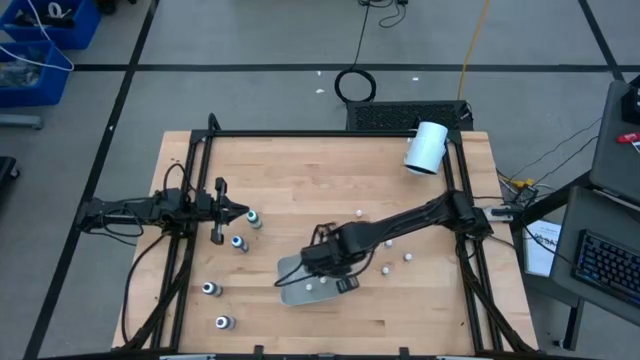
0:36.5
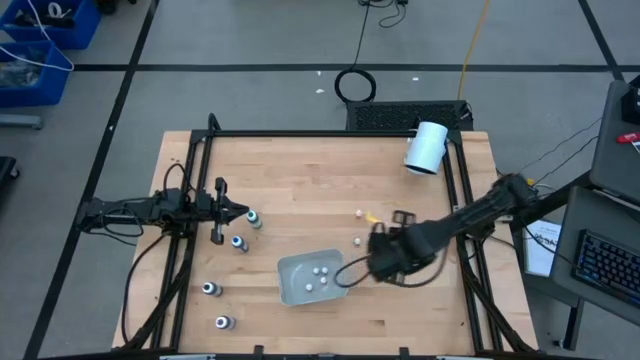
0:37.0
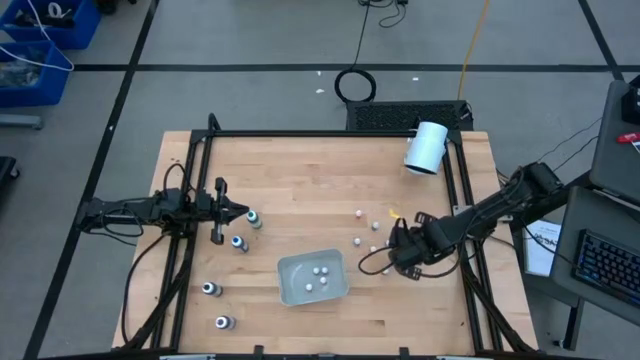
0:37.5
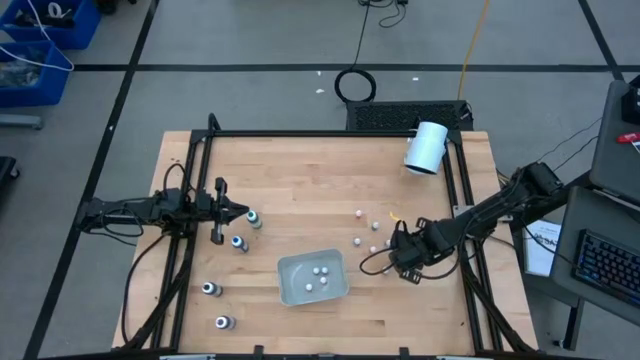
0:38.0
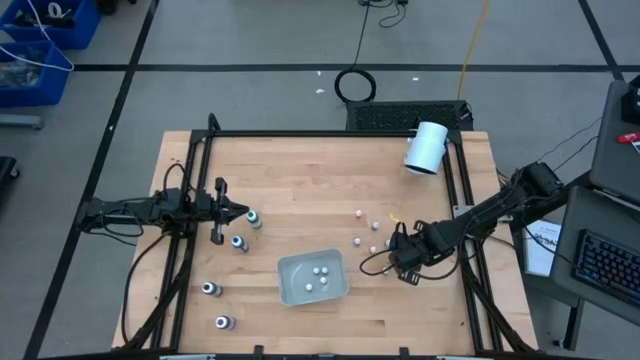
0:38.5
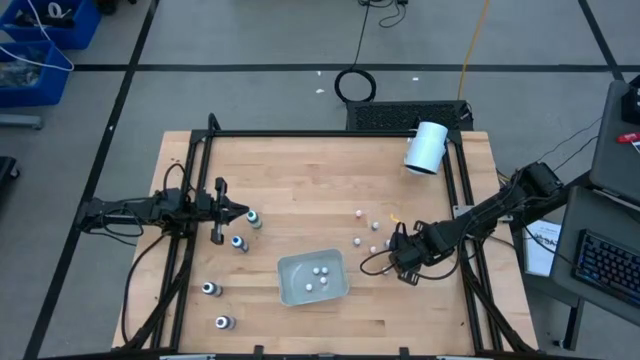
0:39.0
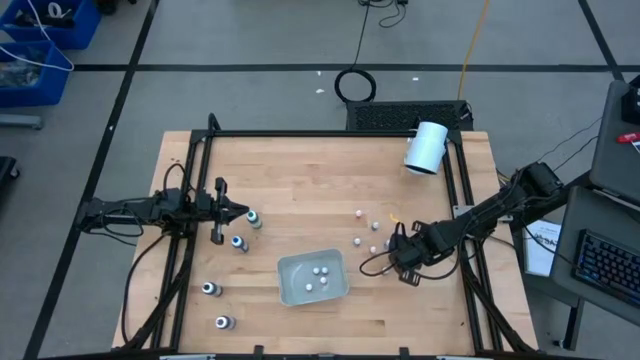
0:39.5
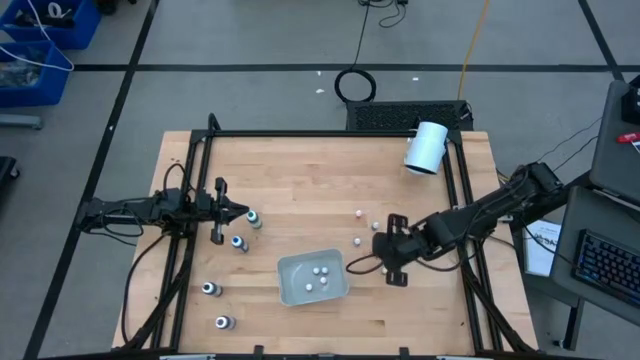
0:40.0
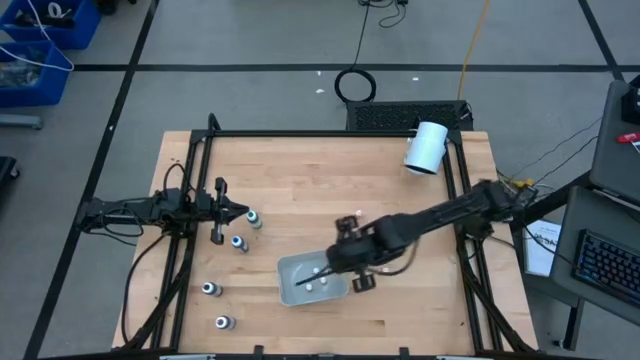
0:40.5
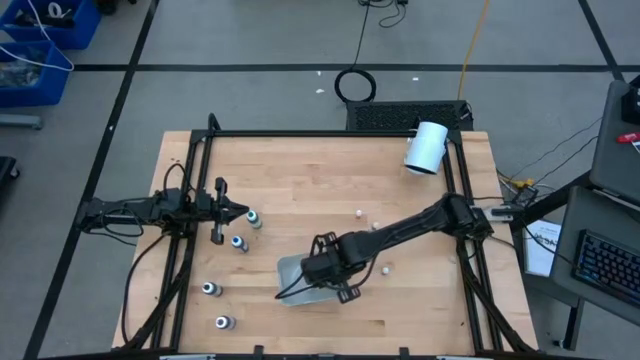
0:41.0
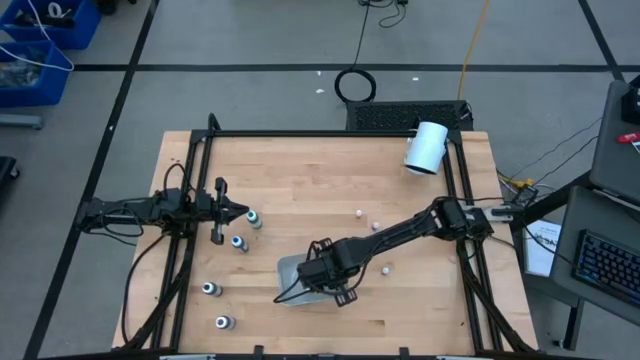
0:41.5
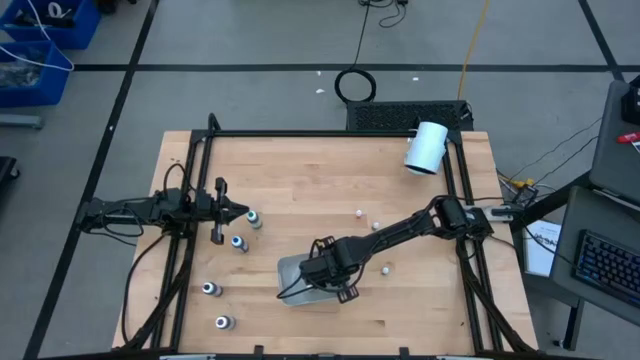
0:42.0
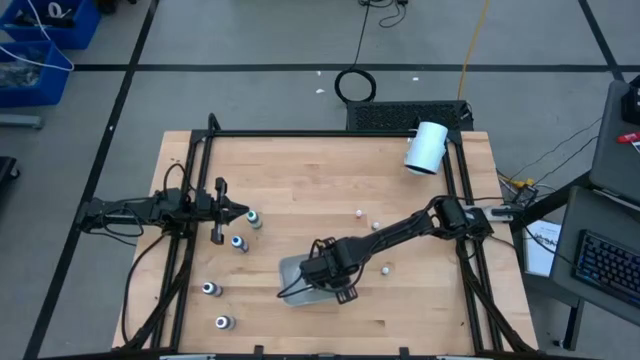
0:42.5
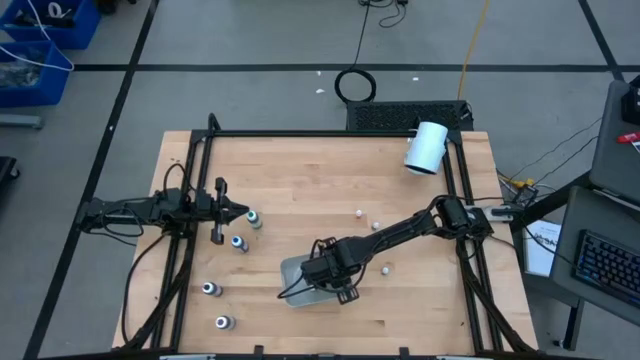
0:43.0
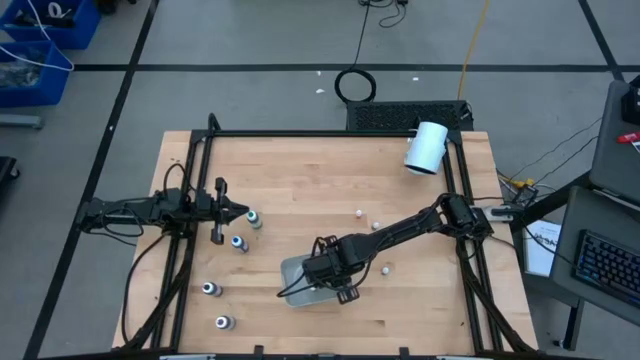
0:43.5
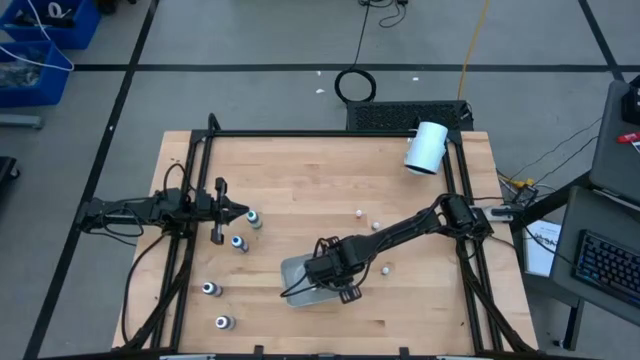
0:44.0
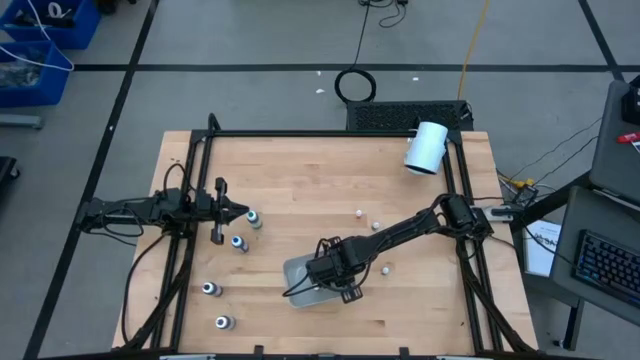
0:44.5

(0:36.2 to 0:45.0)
Task: Pick & Place food coloring
Put the small red food coloring bottle in the gray bin

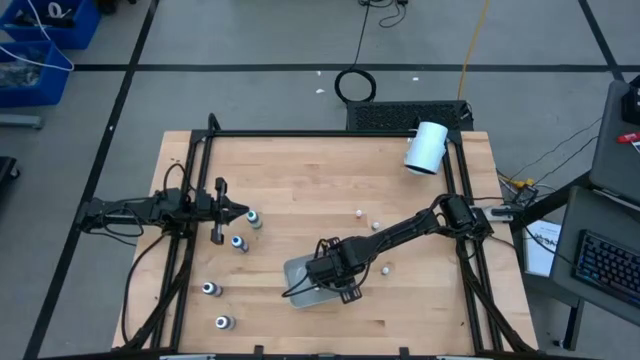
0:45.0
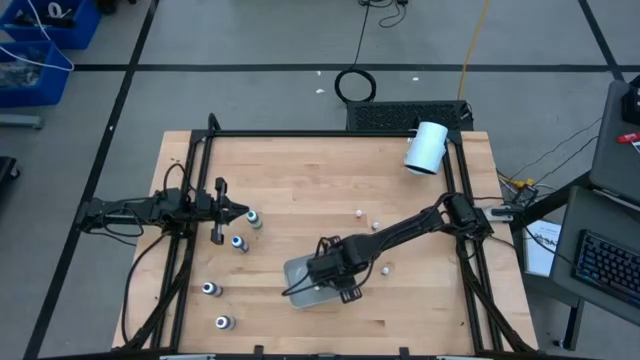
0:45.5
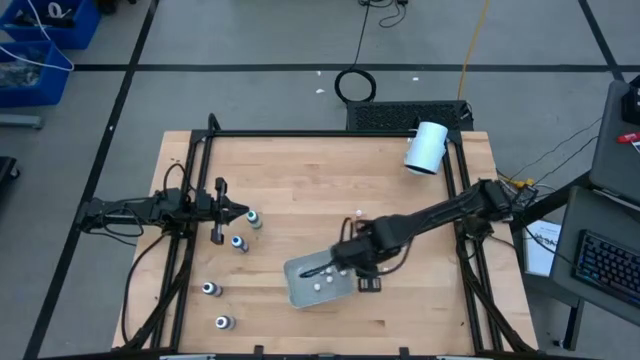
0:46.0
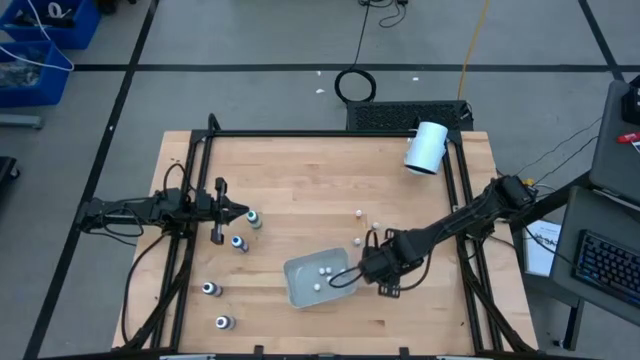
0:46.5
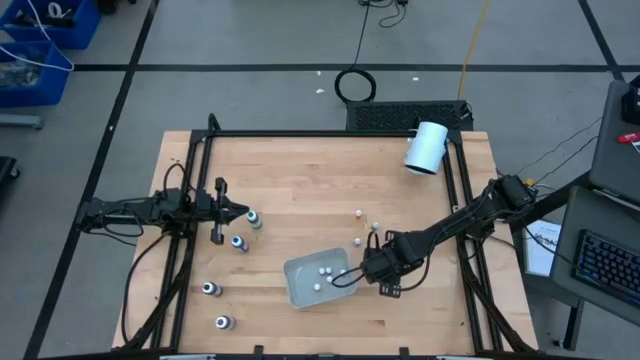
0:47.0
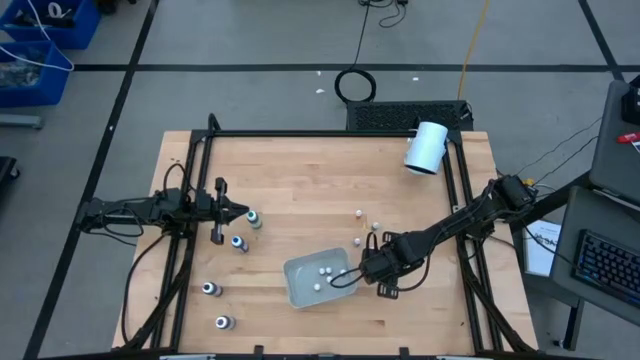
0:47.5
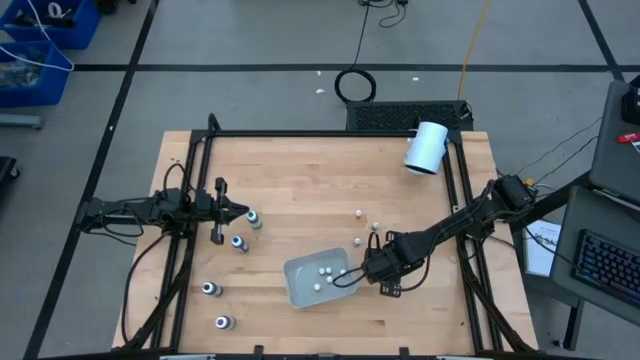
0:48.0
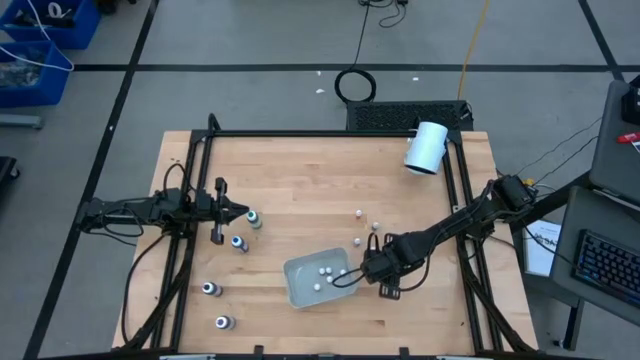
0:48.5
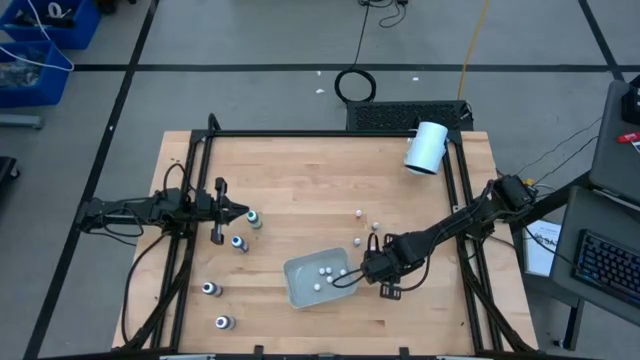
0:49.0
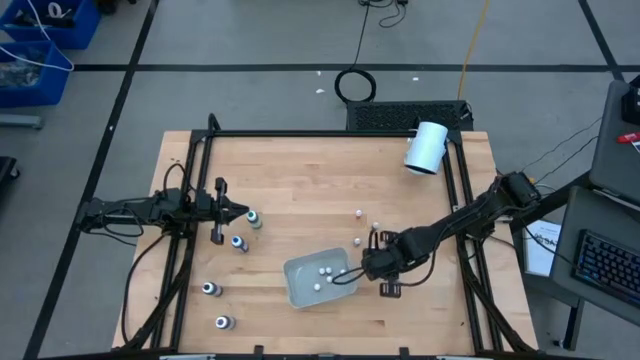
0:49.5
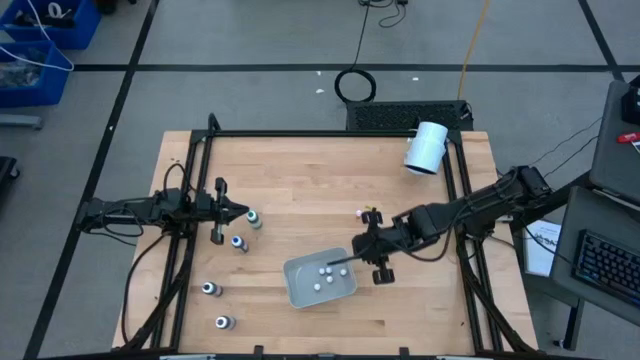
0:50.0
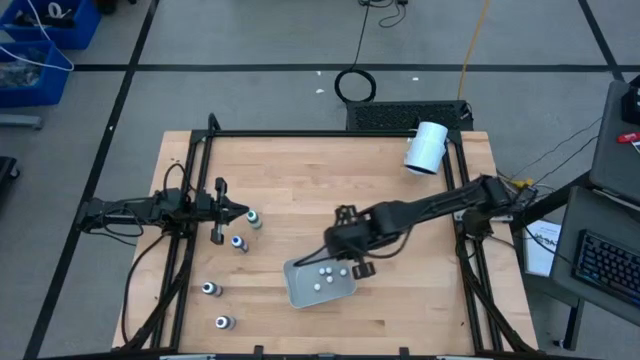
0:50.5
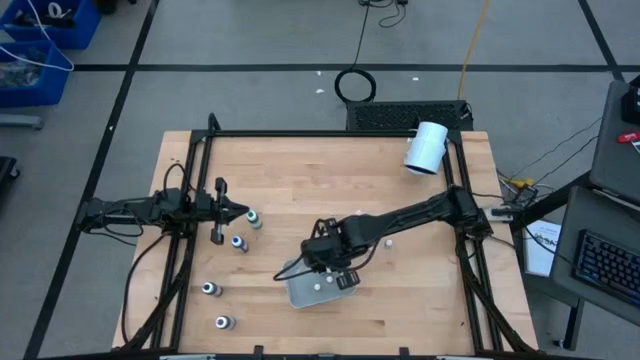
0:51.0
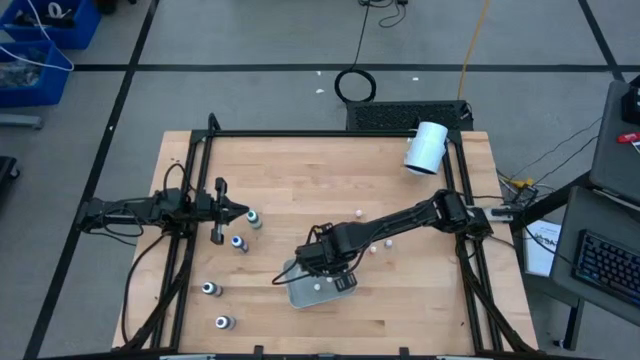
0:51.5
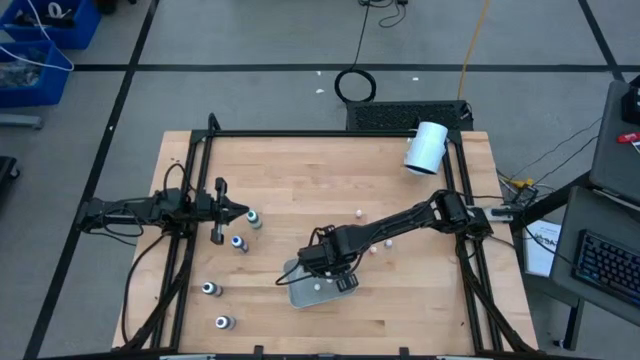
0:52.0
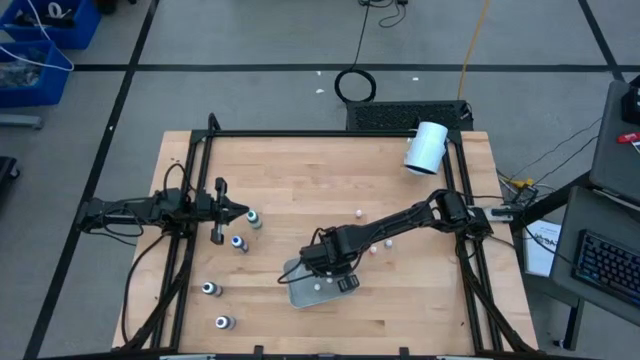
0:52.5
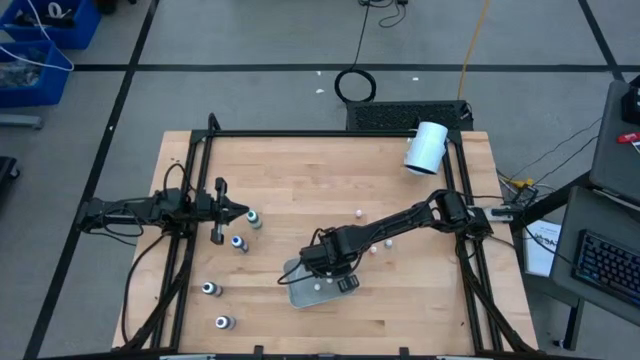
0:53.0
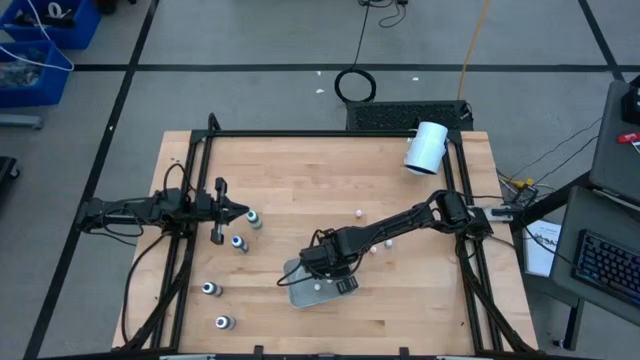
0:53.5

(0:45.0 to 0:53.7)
Put the small violet food coloring bottle in the gray bin

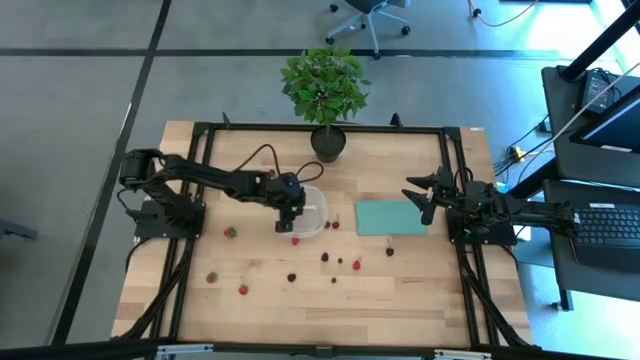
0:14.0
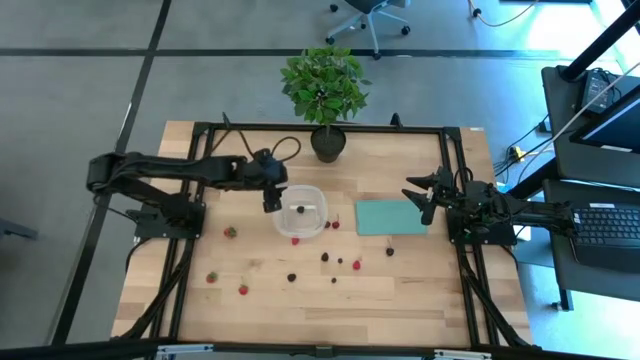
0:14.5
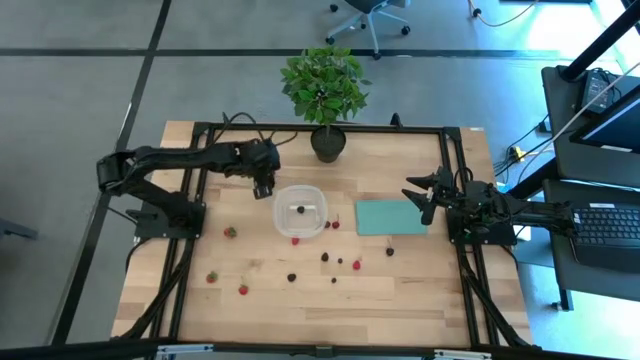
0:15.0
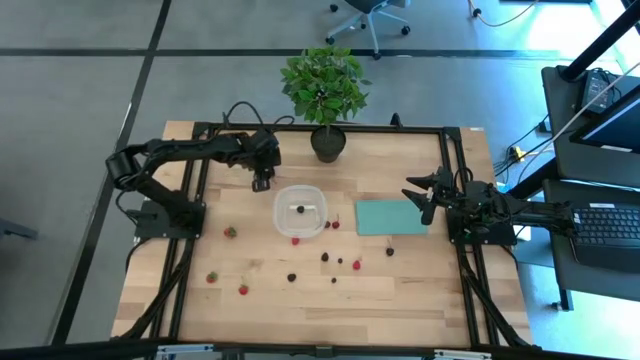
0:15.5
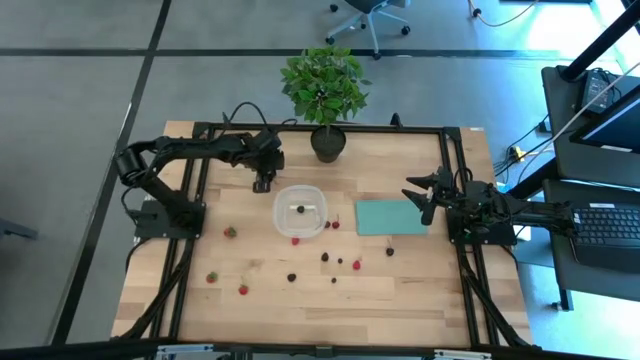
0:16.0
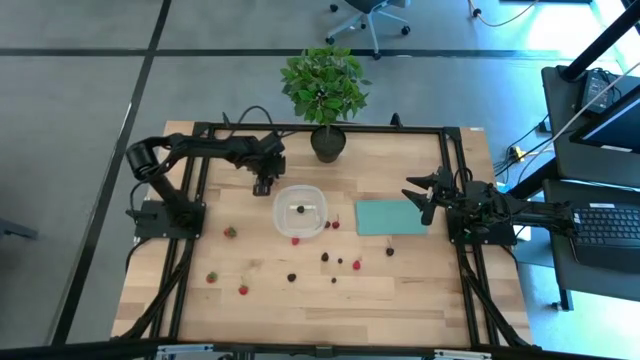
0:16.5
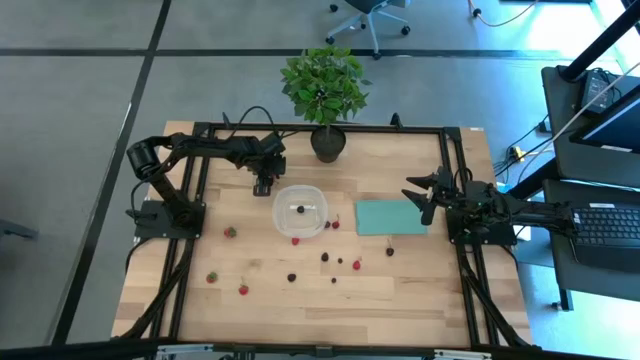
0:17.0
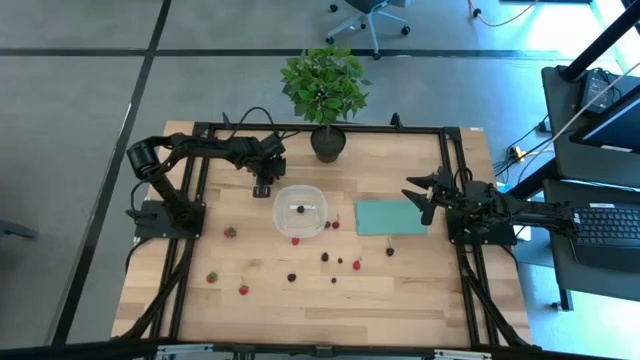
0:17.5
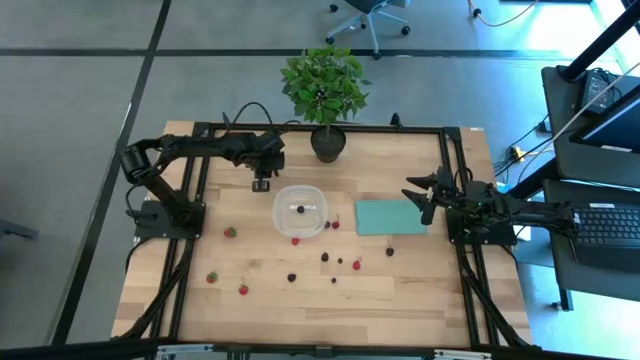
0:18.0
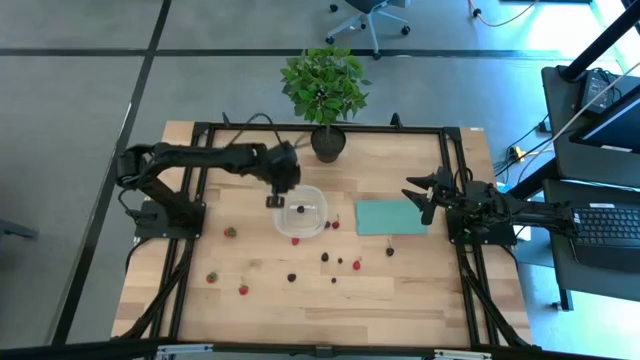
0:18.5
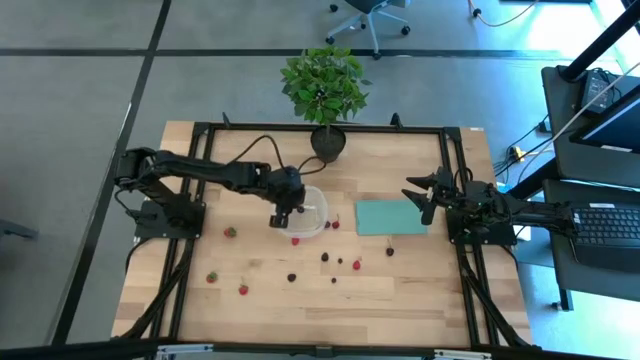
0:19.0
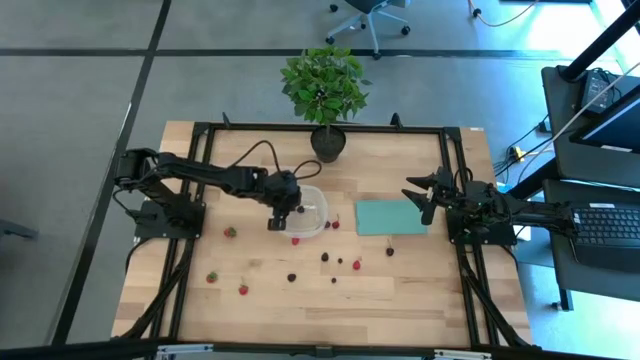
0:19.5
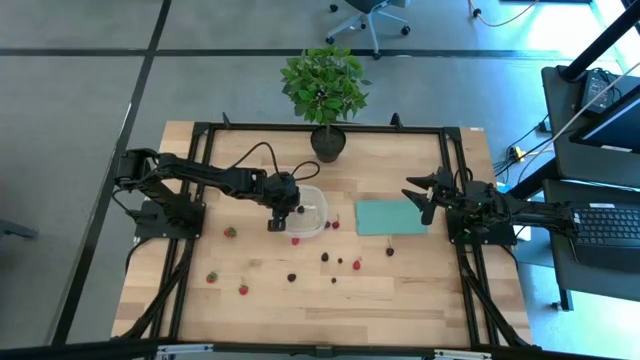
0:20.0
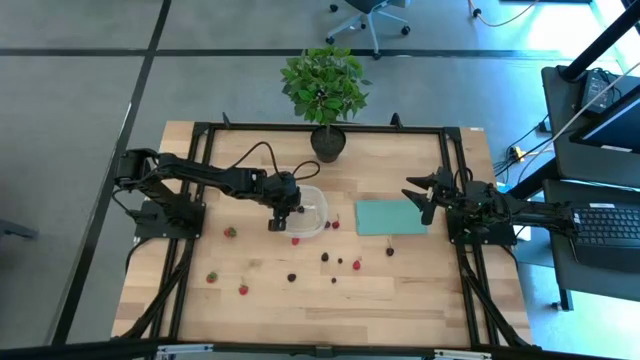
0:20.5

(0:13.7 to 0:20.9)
Task: Pick and placing Produce into tupperware
Put the top red cherry into the container
